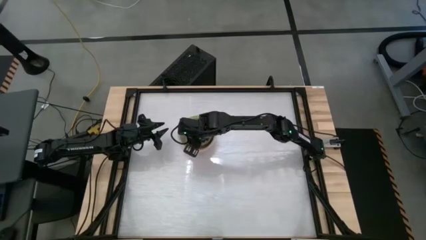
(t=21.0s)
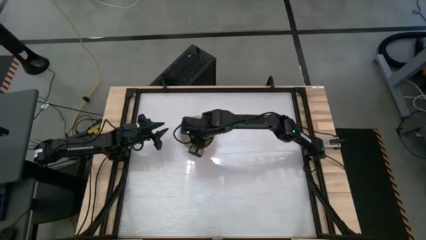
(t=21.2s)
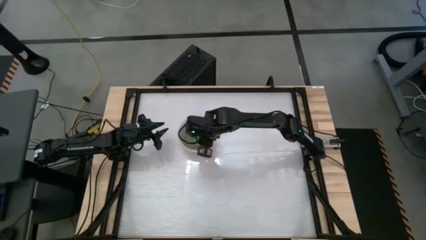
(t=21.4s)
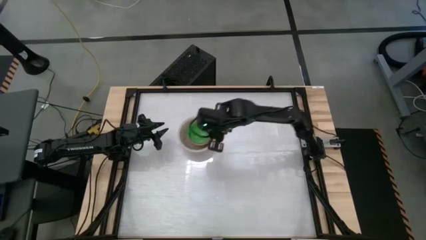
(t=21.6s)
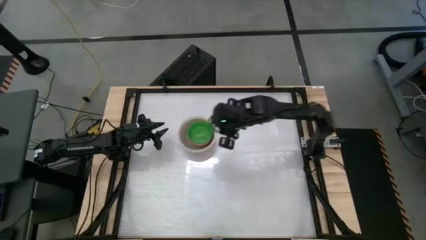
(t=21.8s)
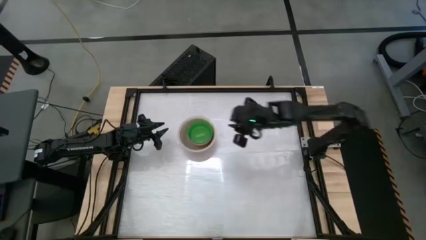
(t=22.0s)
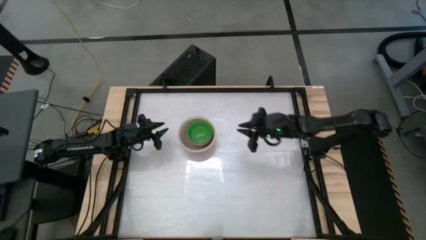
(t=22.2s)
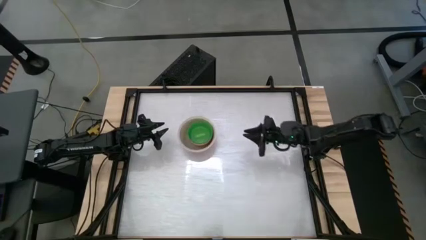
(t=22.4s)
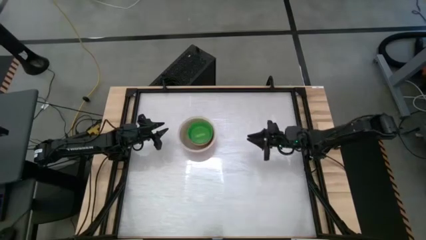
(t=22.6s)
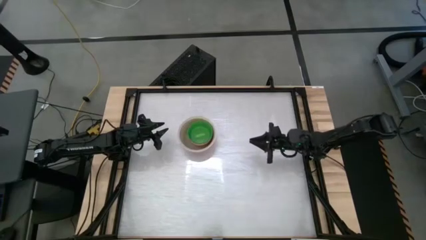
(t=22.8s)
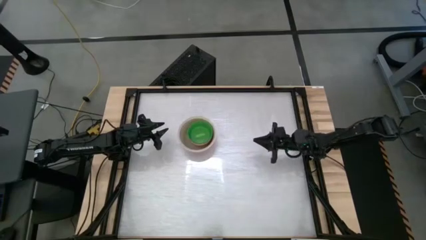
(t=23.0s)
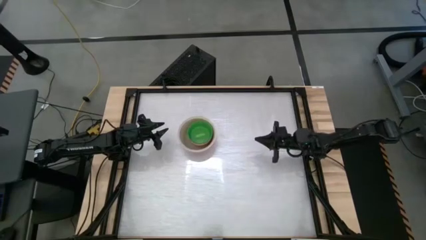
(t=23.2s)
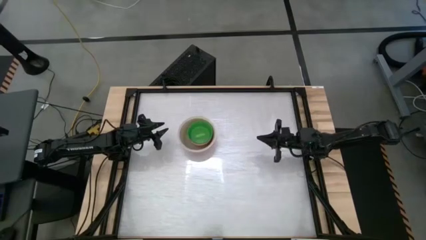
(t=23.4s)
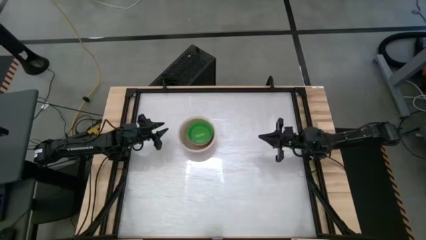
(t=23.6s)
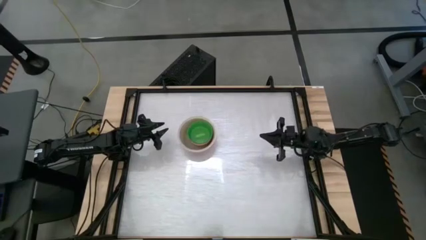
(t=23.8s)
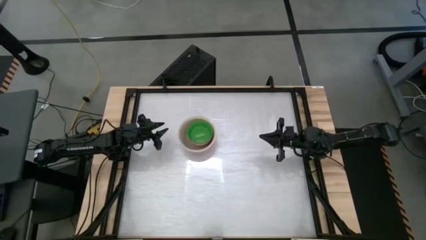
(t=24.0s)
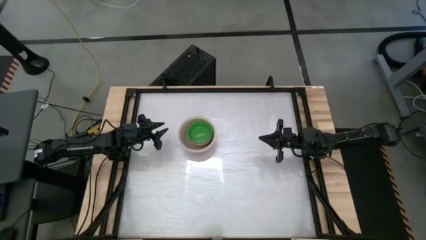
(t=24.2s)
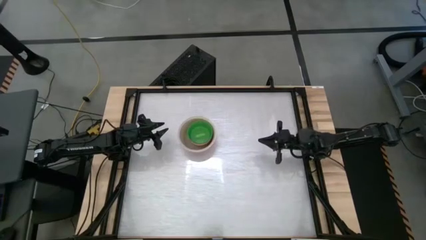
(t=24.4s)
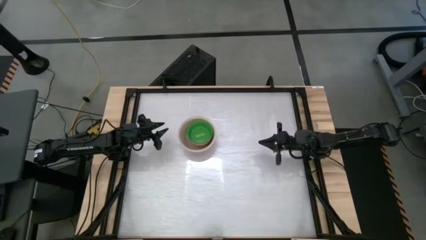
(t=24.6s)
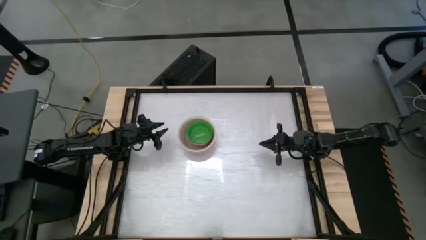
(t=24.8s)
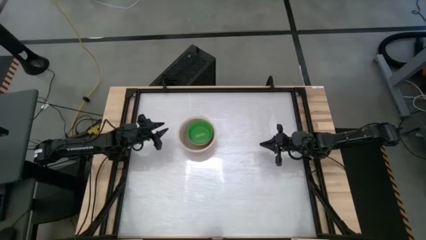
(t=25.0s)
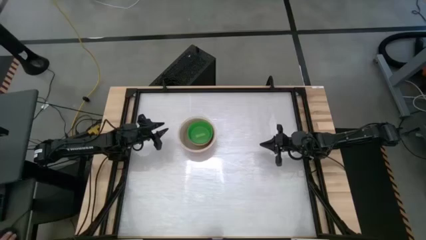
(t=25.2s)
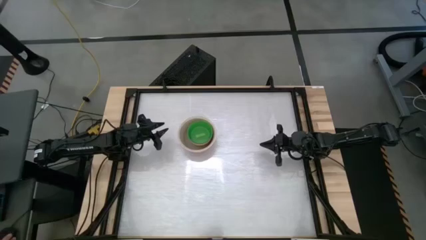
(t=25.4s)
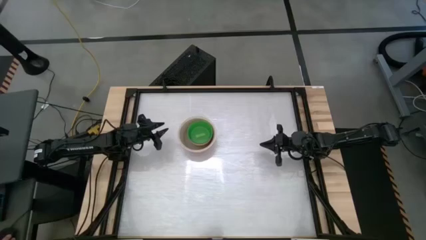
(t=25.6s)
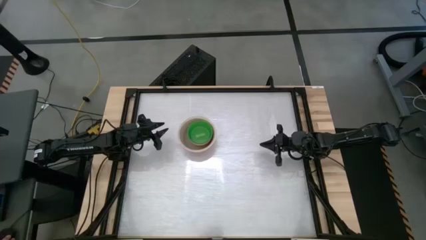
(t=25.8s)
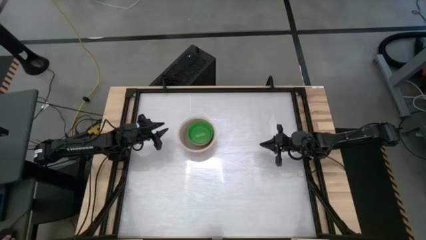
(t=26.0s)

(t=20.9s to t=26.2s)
Return to Home Position

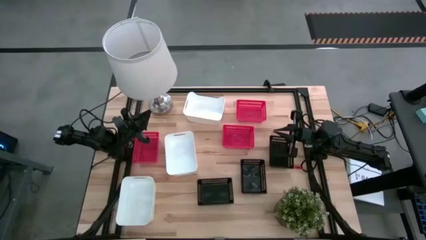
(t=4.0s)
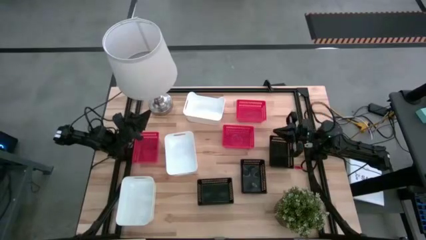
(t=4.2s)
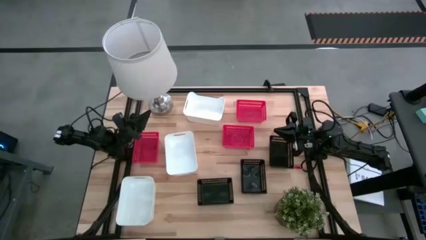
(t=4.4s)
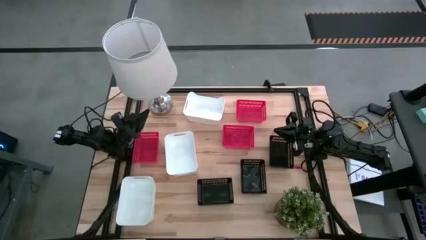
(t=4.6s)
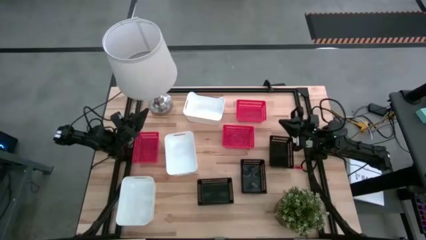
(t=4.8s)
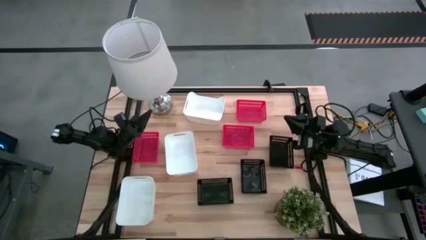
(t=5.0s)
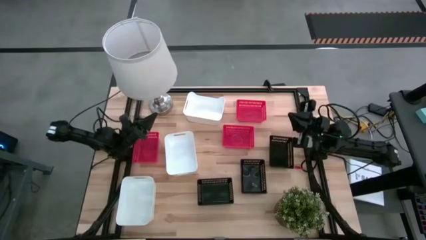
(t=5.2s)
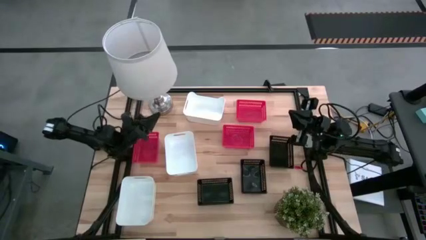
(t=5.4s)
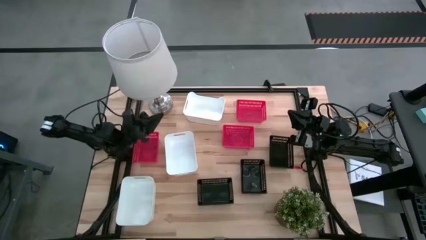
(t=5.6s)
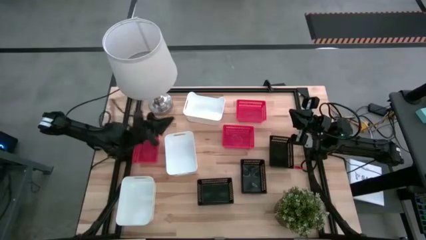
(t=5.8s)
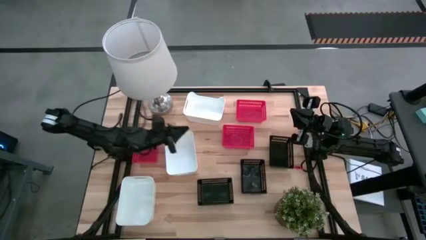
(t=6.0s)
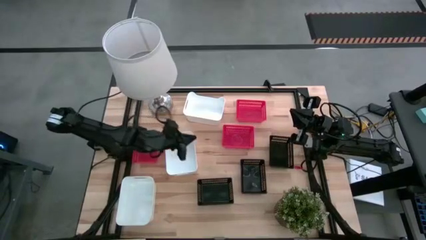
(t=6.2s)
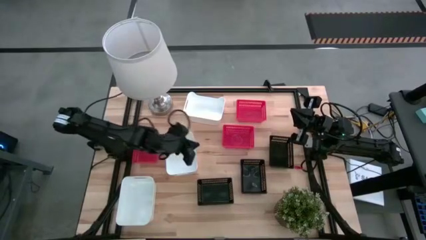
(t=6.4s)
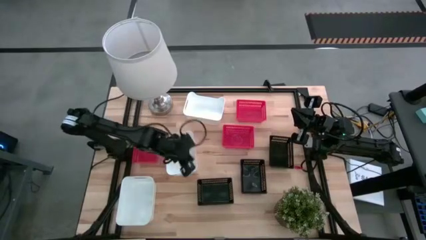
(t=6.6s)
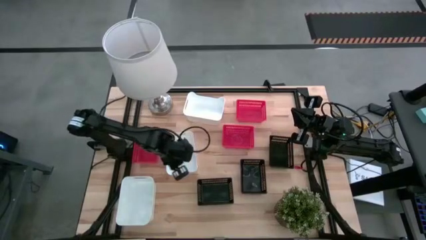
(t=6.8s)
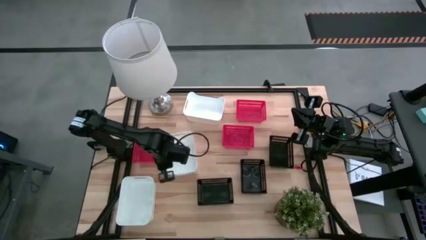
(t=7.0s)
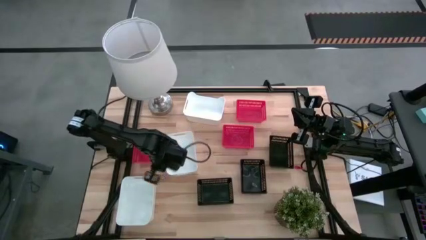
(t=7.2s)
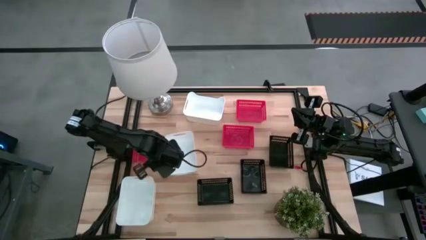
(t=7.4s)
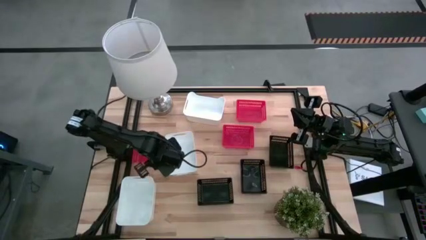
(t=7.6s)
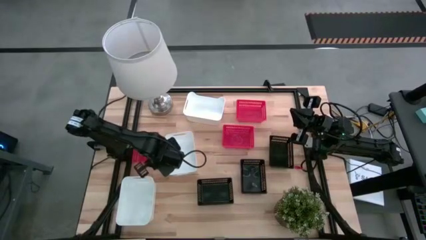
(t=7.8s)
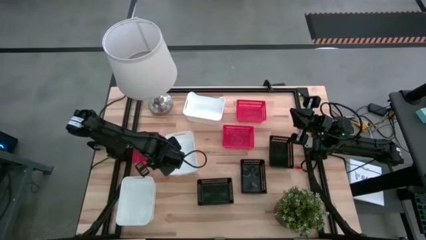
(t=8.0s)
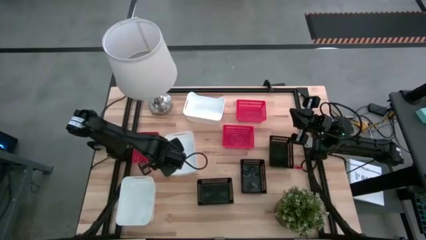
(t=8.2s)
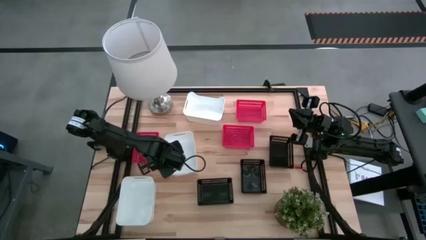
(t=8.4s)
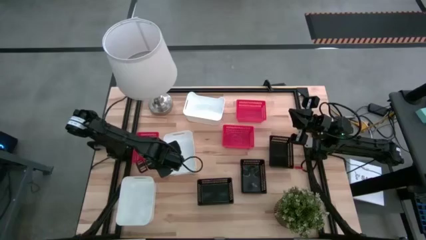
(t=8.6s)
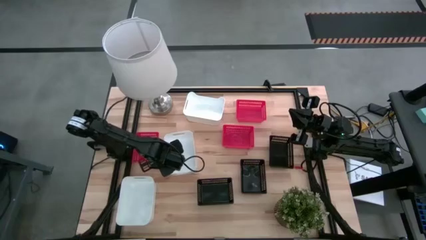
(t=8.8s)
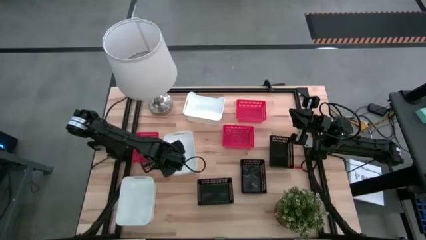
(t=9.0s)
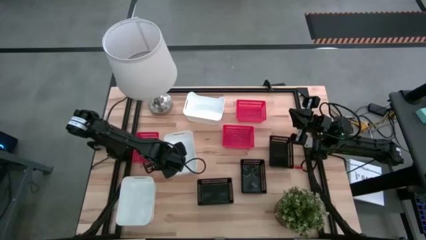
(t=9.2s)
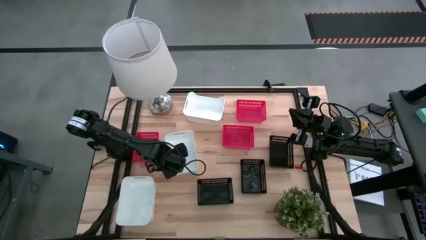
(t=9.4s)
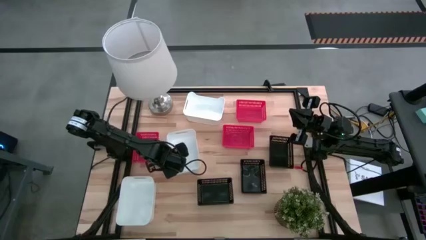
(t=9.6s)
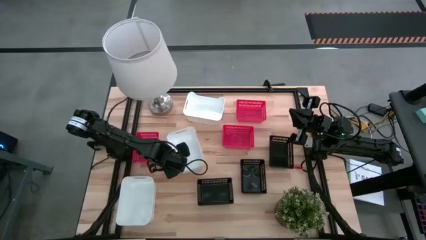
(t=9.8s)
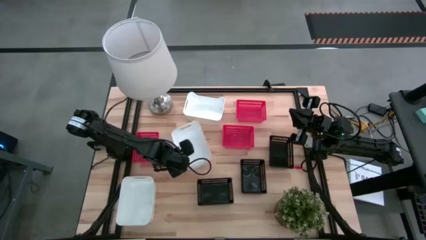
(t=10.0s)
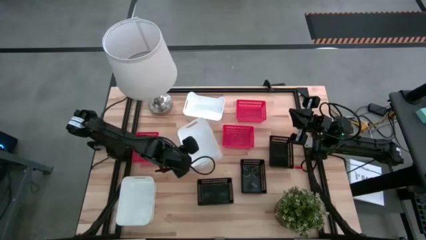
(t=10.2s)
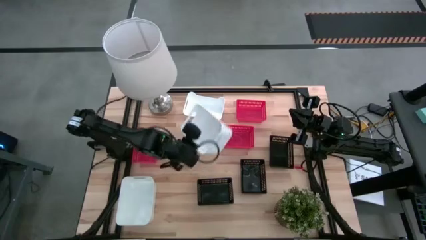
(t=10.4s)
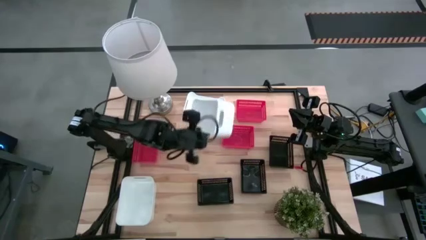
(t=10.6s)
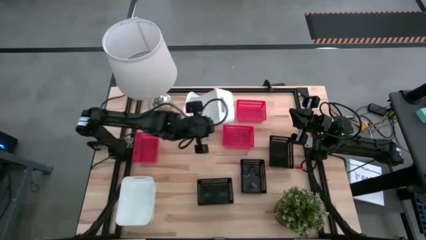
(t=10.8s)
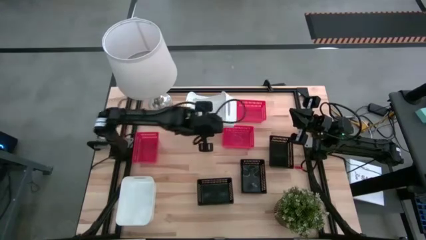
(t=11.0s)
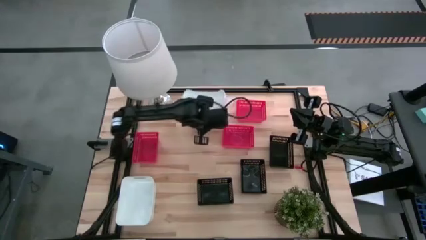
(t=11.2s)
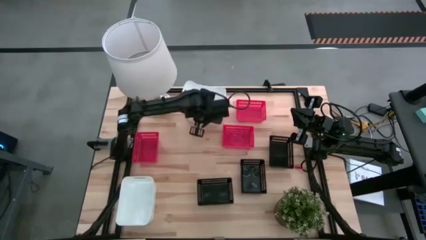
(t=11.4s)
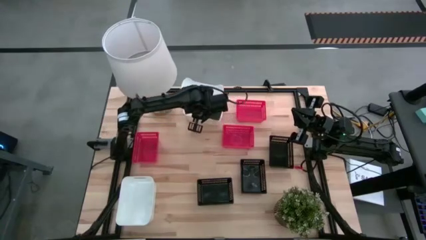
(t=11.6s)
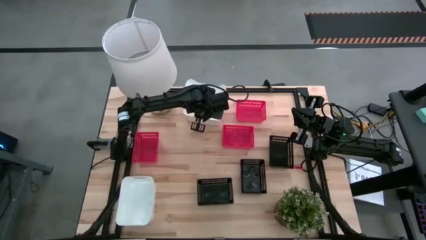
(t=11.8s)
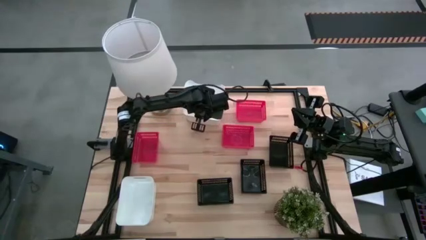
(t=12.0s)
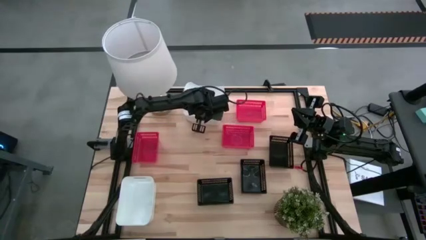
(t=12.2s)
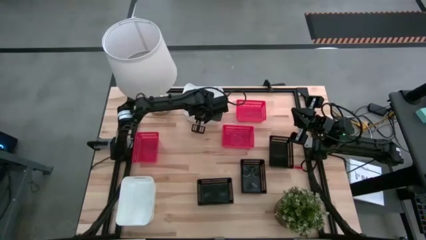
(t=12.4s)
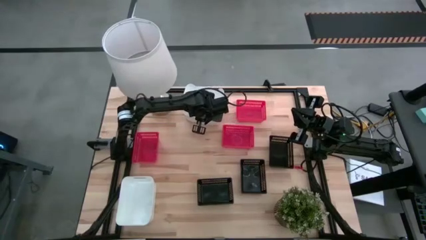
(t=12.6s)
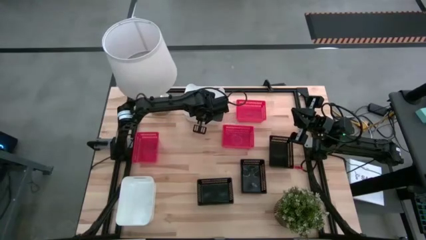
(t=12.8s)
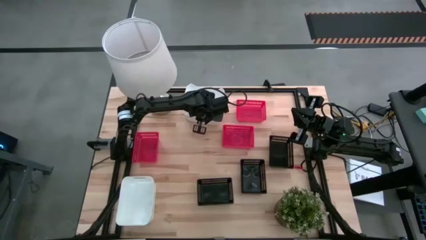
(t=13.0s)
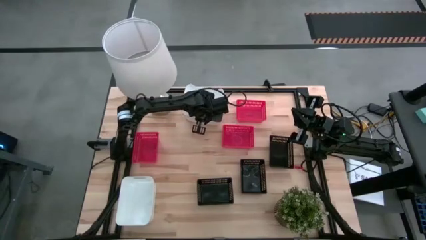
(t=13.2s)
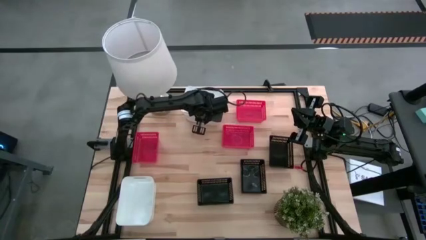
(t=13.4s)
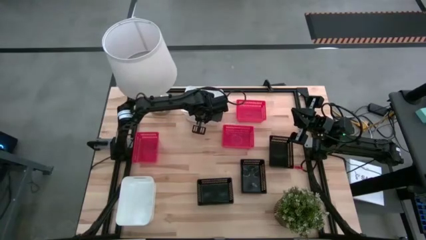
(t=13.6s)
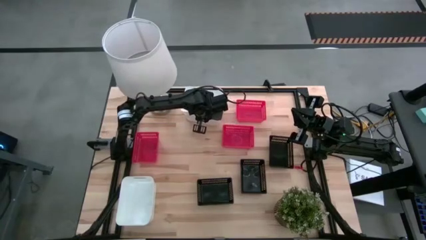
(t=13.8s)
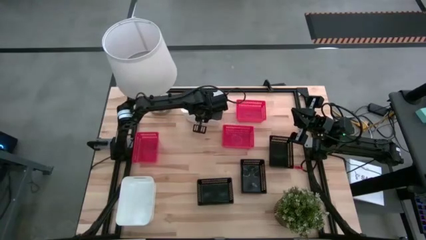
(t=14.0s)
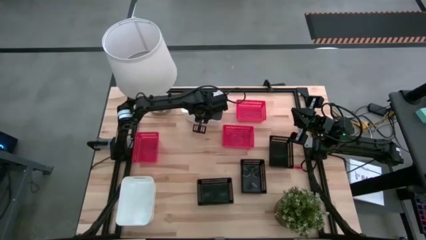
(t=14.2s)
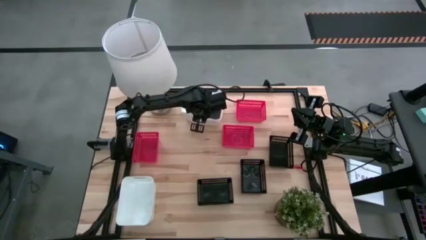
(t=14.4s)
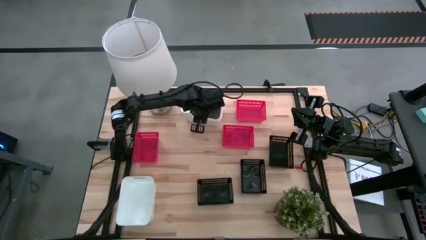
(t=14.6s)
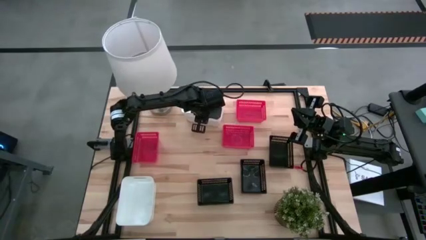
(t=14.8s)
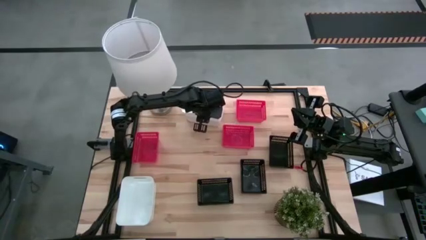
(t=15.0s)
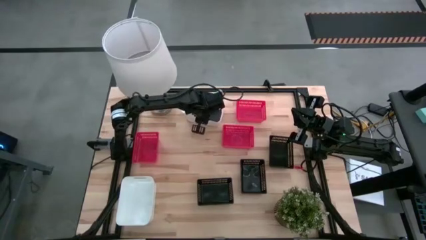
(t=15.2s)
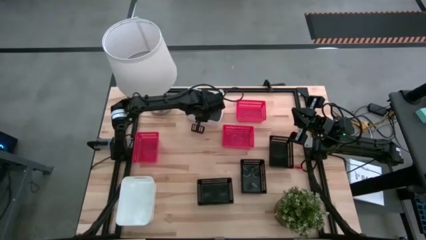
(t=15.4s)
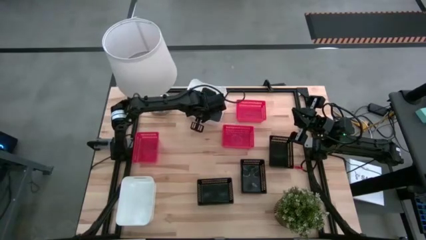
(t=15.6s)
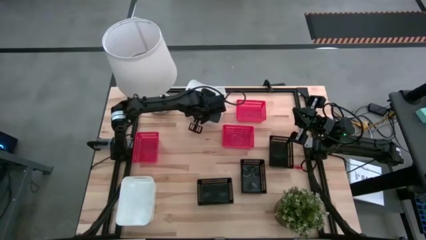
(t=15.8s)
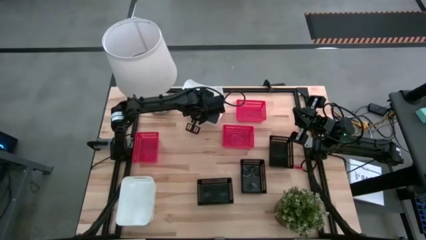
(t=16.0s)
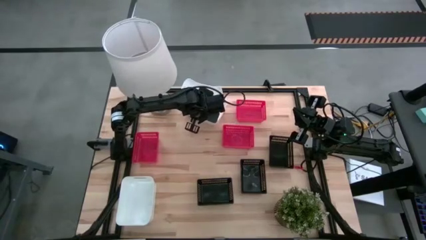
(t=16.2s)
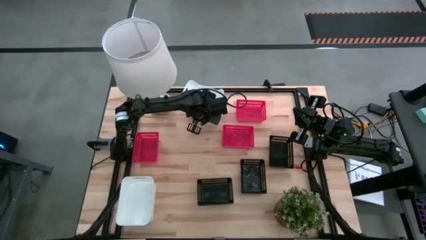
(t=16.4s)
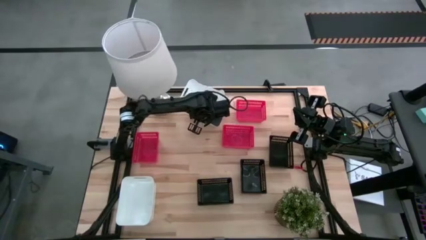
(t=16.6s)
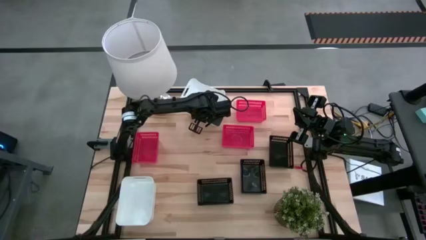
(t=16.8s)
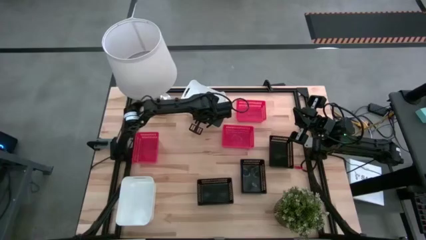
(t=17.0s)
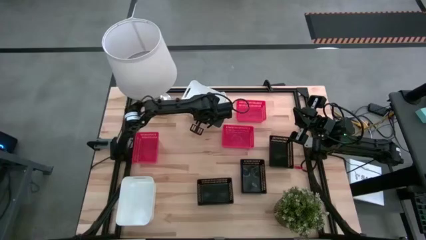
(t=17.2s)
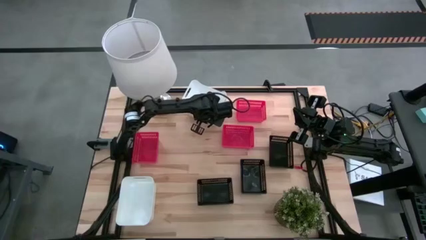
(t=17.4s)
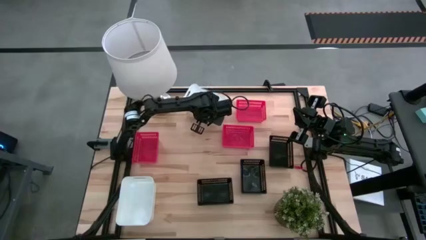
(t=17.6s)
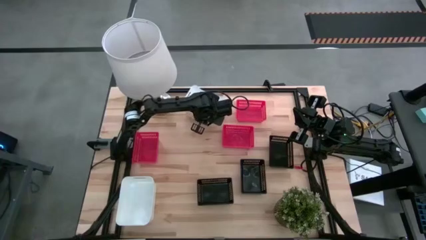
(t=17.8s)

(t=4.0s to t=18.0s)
Stack the middle white bin on top of the top white bin
